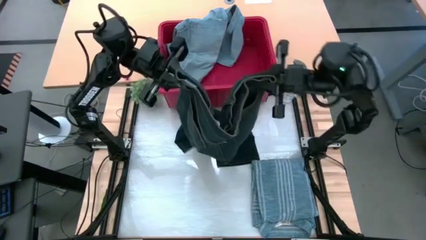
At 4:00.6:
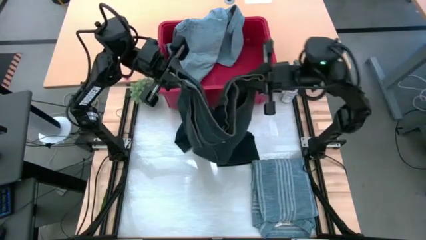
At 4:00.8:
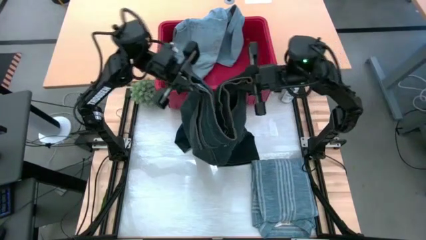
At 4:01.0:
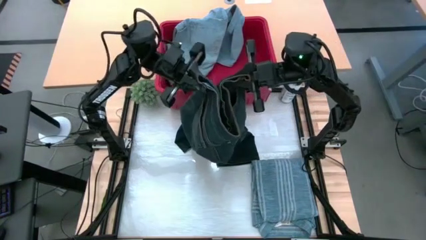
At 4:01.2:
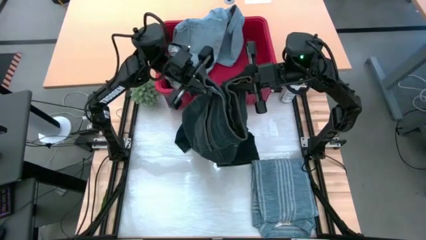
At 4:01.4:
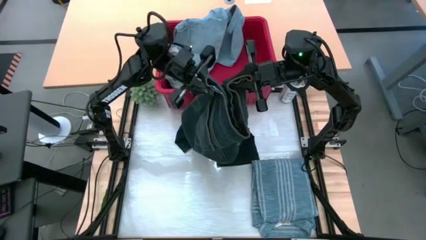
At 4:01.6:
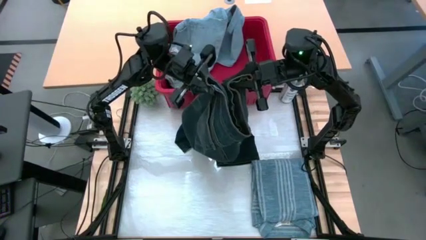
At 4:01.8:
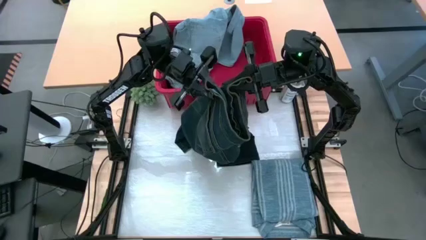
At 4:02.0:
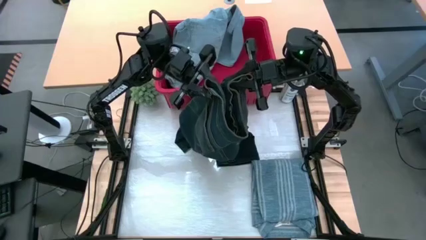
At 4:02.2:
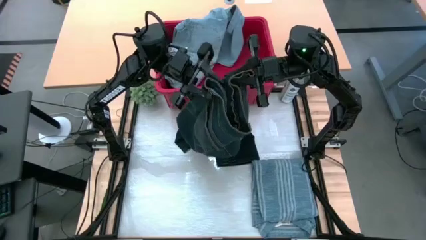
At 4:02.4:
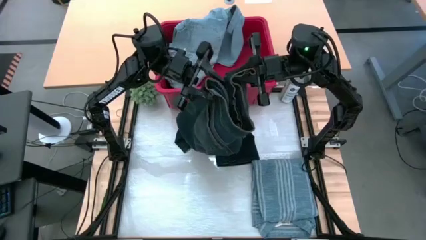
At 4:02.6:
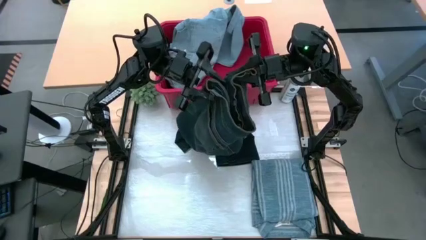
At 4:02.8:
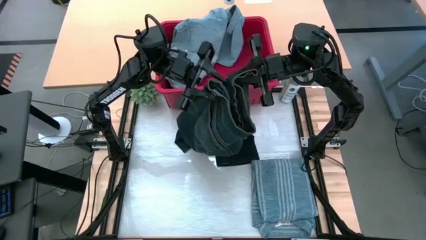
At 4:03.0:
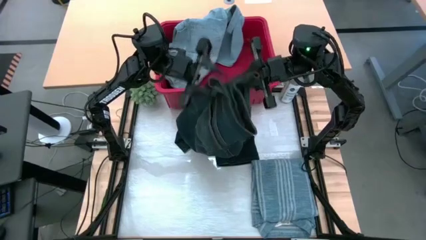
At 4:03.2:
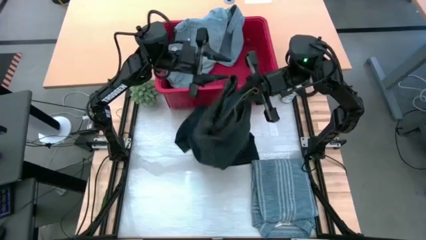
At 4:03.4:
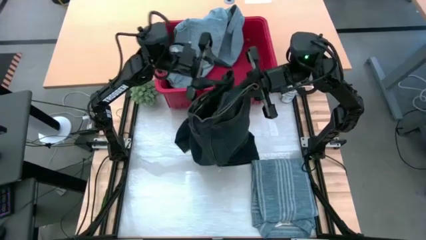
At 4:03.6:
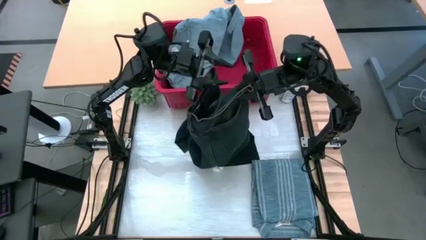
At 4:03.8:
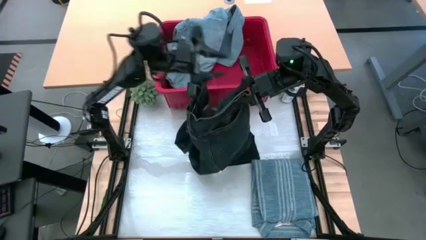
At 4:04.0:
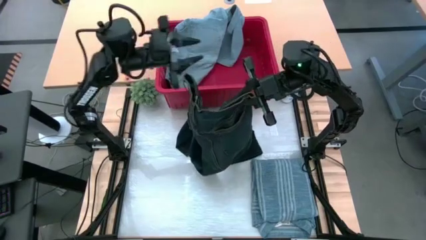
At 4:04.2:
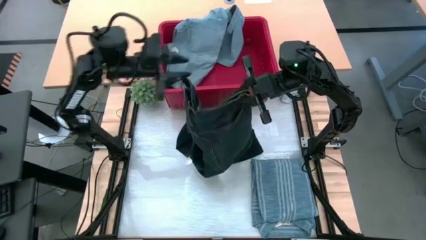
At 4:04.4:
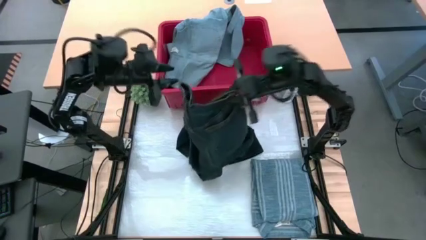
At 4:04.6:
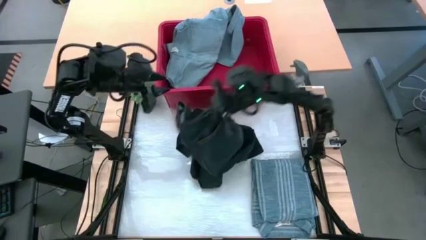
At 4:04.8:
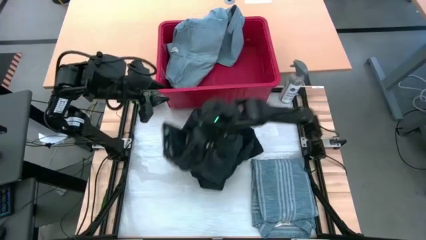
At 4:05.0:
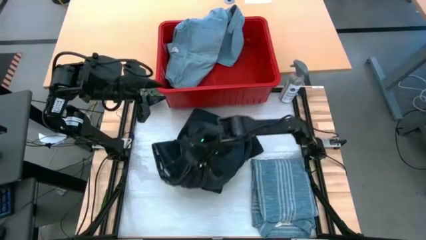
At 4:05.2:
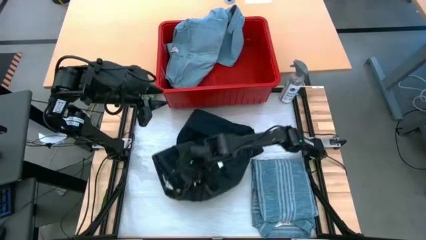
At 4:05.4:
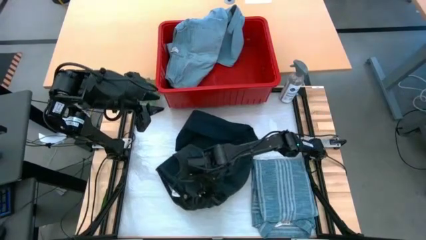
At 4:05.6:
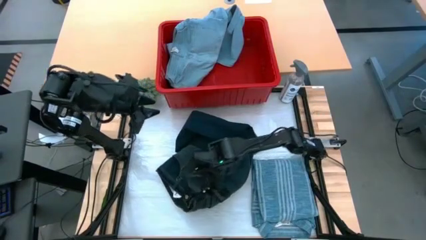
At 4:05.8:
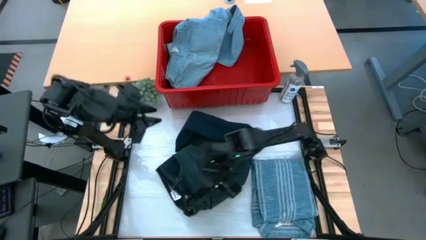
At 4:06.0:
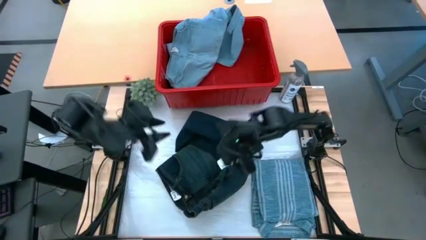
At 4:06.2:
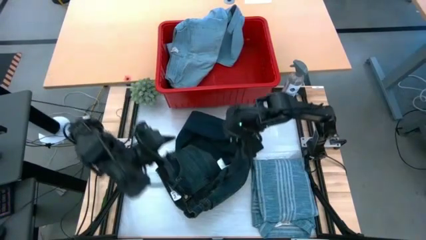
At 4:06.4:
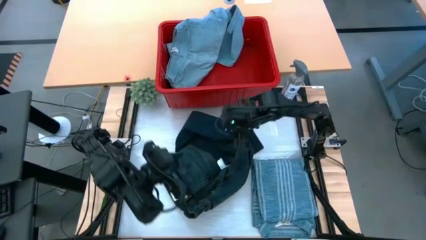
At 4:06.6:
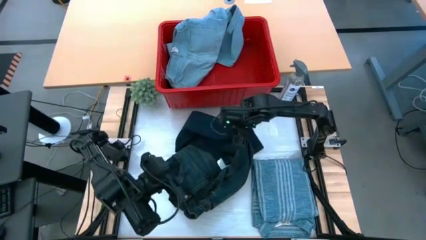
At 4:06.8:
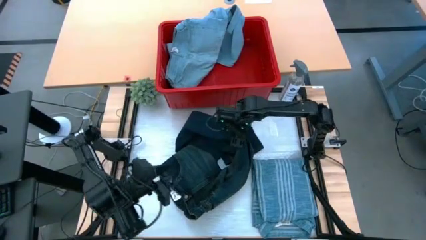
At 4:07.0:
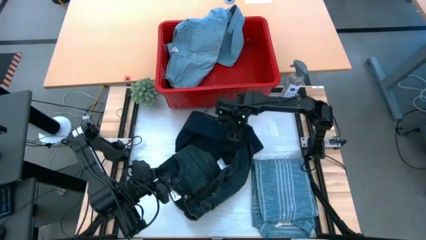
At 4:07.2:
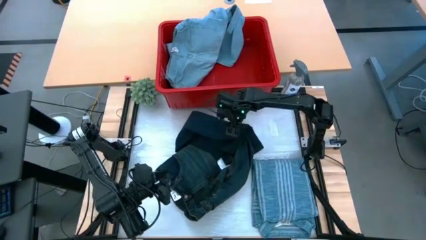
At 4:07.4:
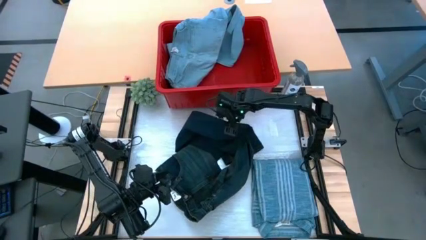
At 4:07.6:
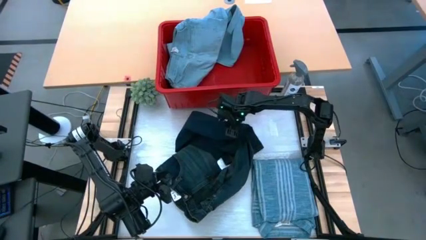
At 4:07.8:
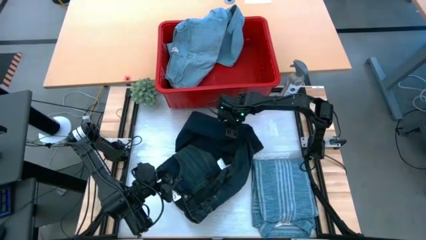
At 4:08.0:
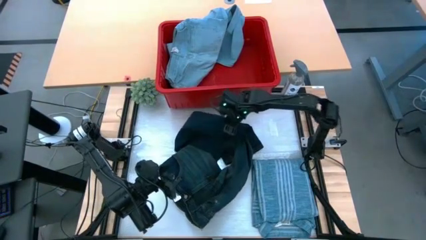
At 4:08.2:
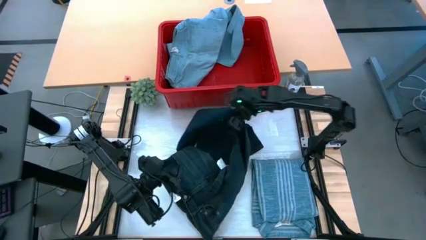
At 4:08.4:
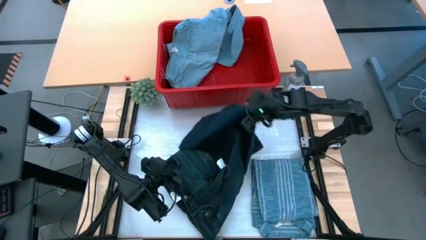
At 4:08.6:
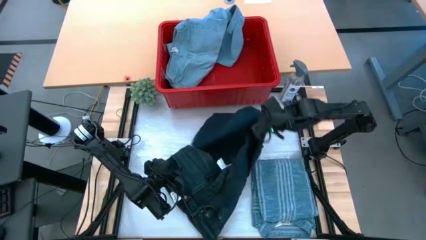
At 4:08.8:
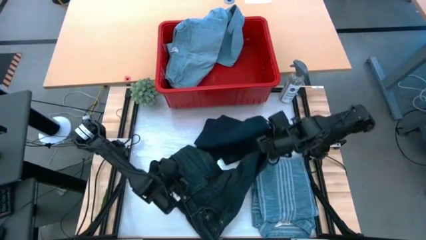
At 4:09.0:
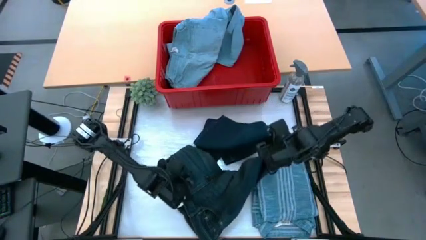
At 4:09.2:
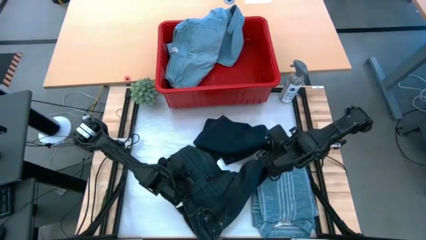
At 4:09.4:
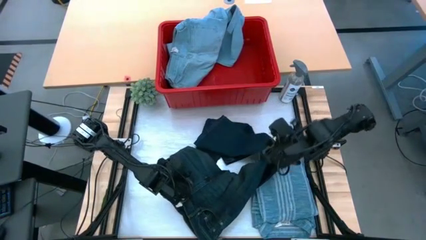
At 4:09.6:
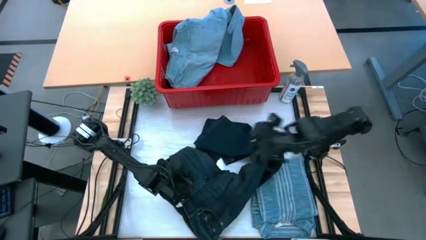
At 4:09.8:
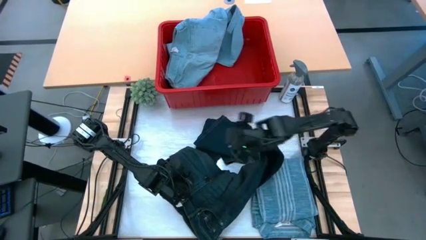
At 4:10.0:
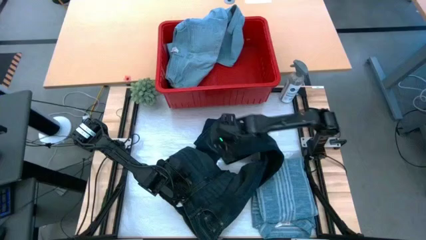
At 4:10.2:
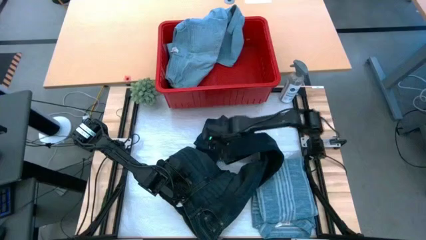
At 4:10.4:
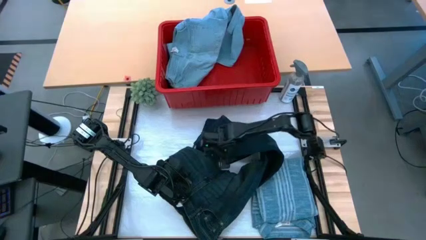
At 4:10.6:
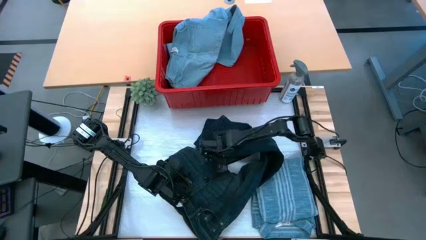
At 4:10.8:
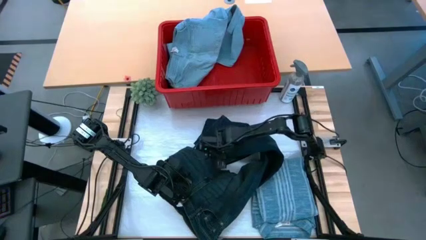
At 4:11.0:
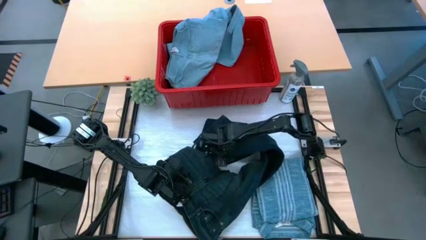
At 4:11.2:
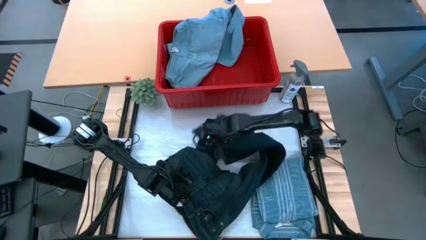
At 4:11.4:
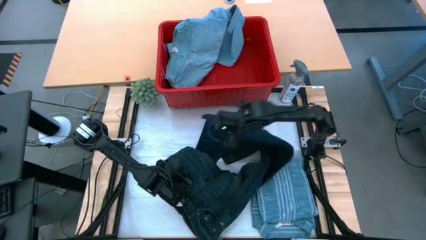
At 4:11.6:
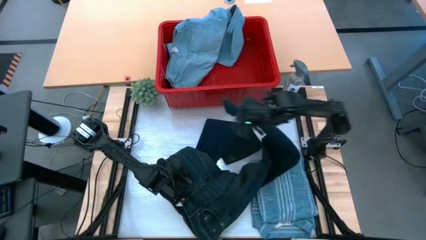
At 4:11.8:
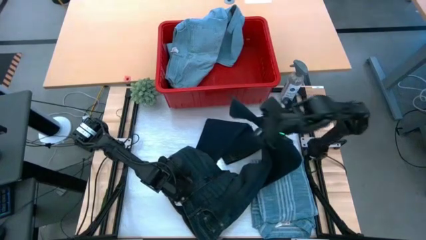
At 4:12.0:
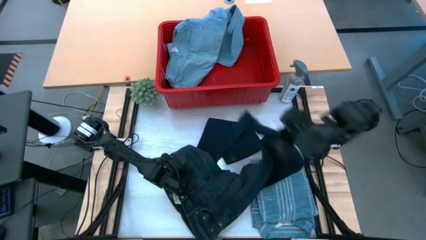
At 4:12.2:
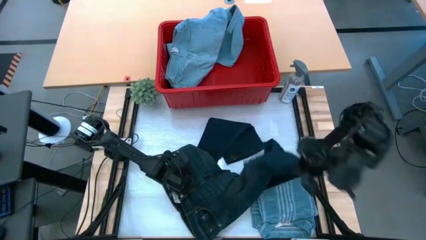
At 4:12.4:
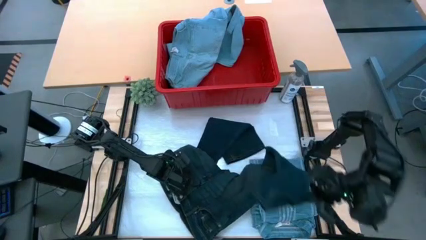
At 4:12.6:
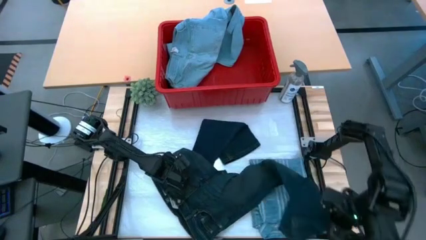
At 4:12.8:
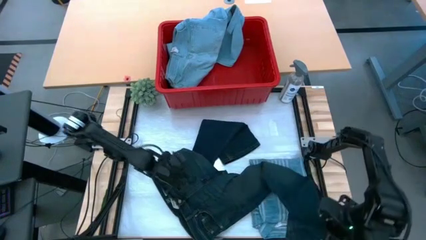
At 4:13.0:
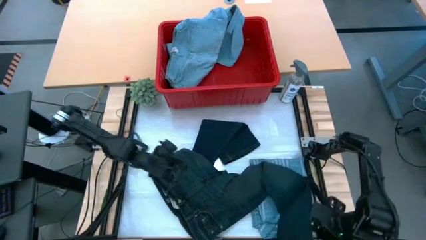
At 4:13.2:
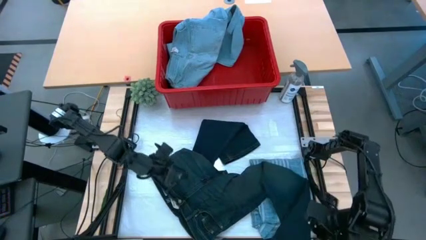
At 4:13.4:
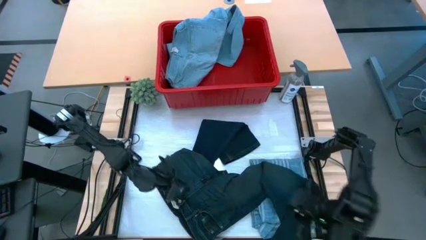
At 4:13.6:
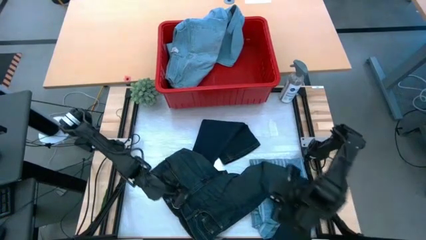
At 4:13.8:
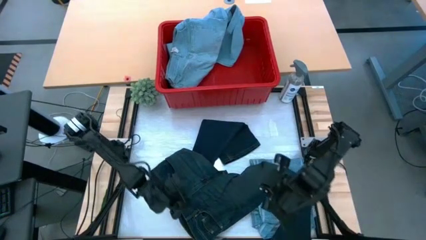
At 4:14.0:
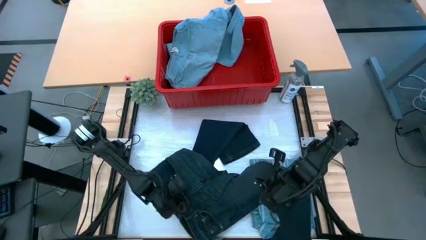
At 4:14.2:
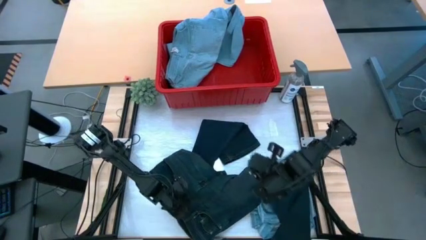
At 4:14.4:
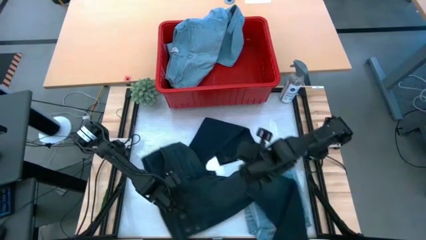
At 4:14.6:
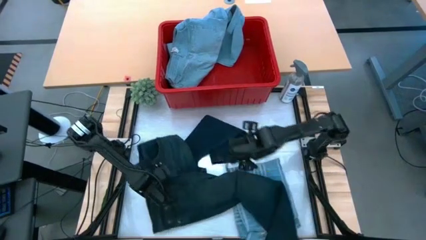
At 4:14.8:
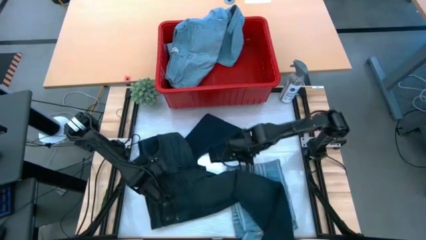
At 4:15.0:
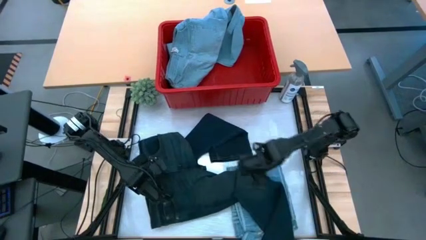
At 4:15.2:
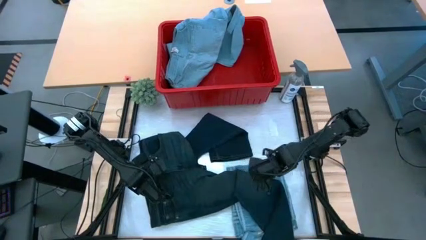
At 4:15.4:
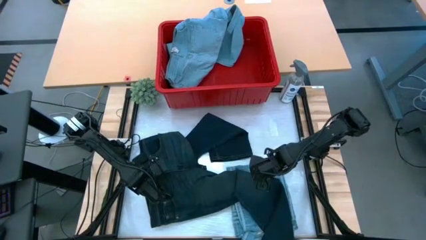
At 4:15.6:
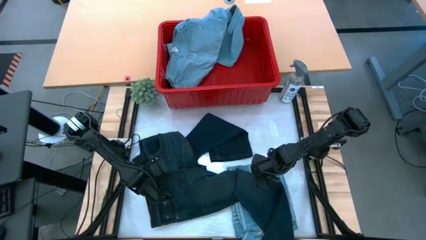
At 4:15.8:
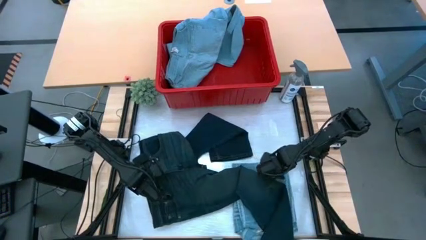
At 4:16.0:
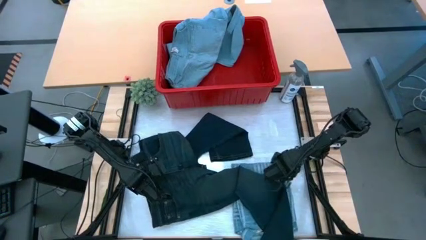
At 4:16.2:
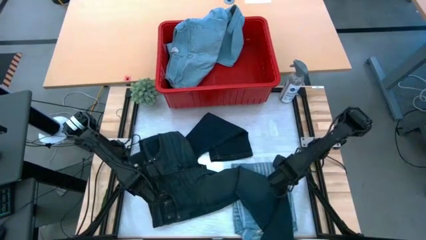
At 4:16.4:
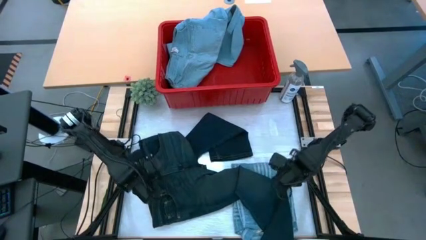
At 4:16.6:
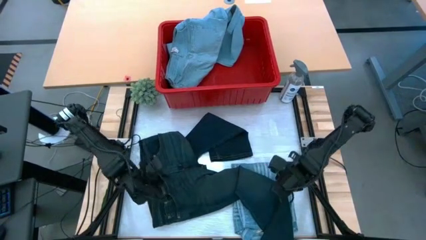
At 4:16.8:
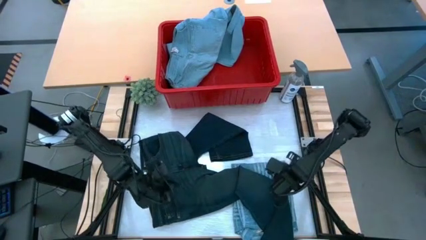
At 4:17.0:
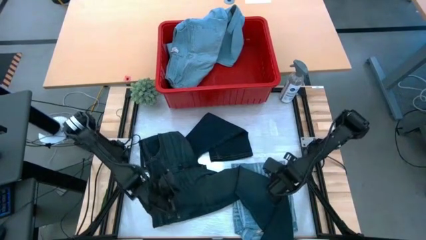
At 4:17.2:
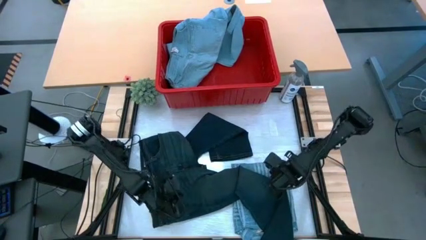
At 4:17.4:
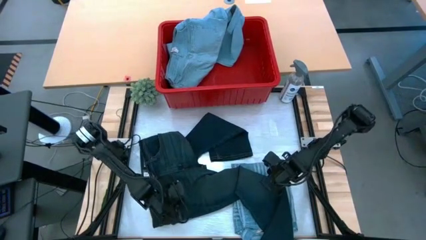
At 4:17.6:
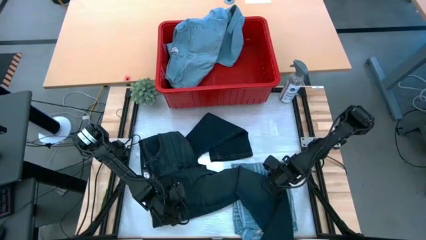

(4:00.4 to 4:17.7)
Task: Fold Laundry from Bin
Fold the blue denim pants
